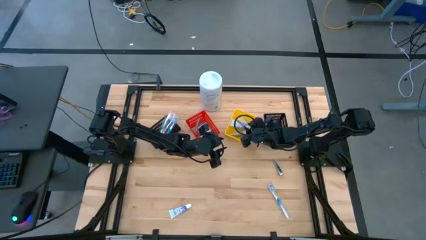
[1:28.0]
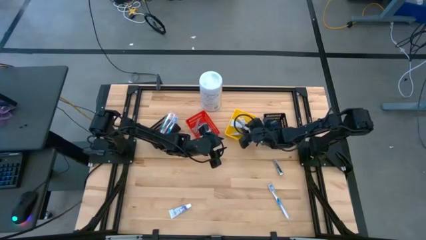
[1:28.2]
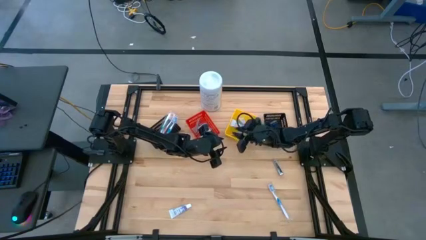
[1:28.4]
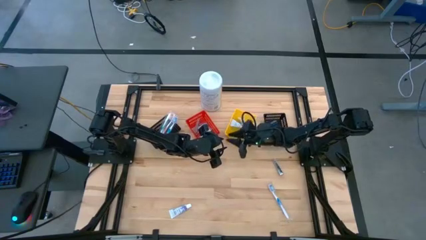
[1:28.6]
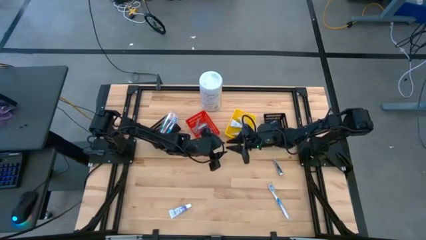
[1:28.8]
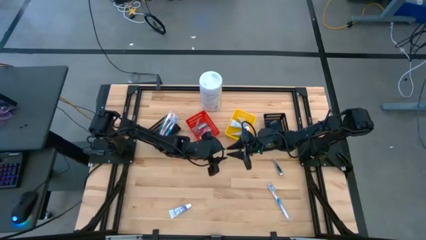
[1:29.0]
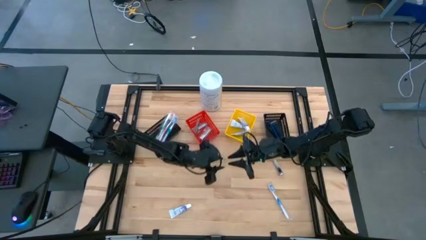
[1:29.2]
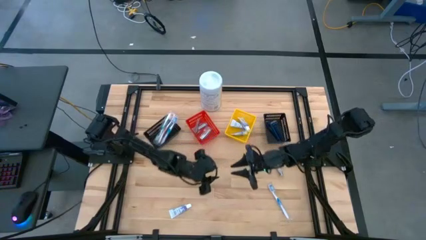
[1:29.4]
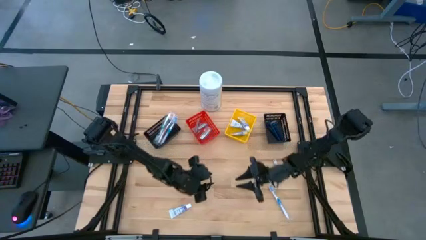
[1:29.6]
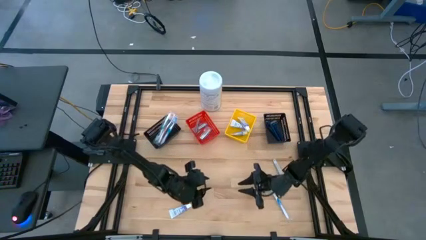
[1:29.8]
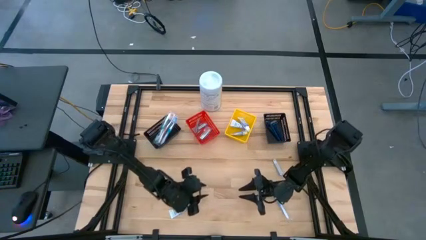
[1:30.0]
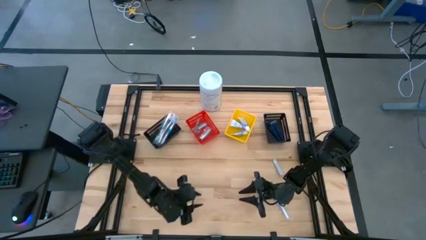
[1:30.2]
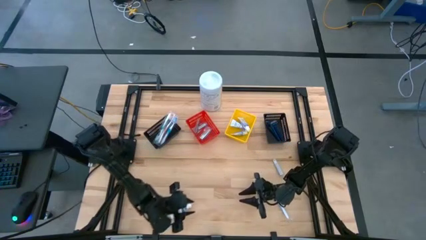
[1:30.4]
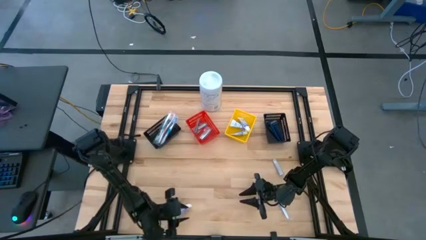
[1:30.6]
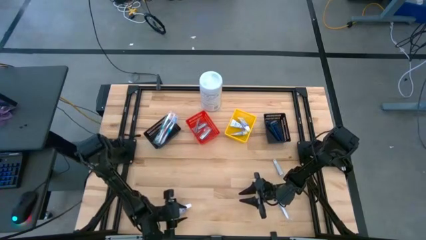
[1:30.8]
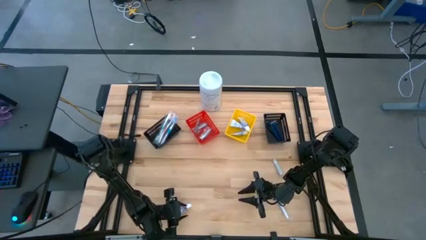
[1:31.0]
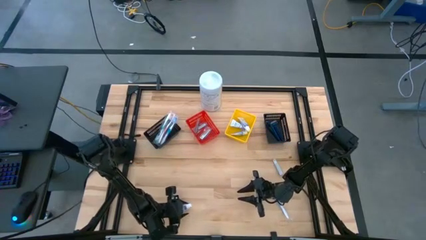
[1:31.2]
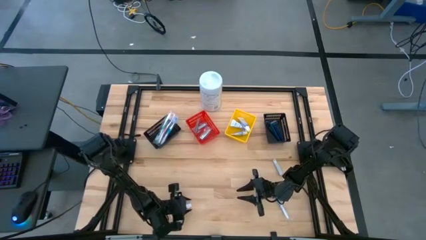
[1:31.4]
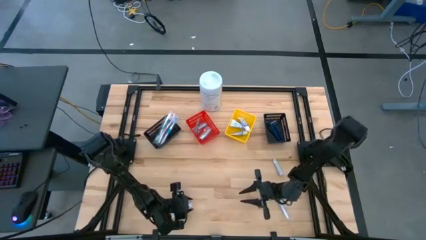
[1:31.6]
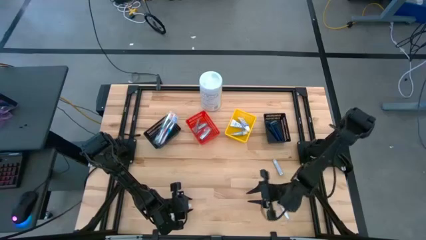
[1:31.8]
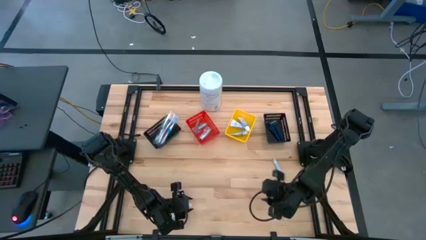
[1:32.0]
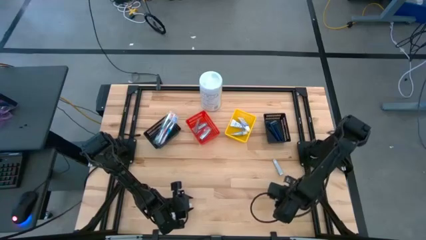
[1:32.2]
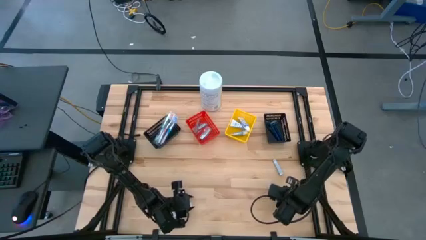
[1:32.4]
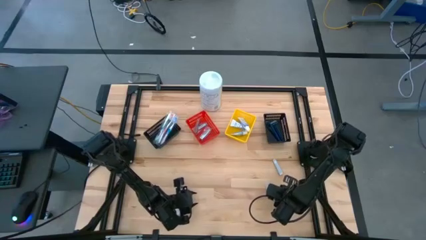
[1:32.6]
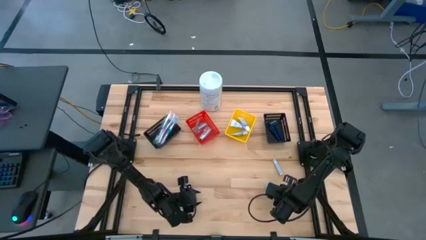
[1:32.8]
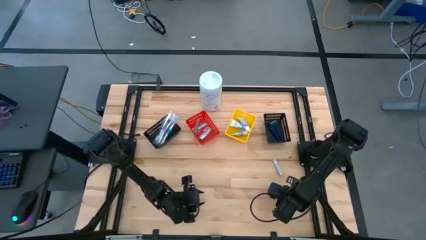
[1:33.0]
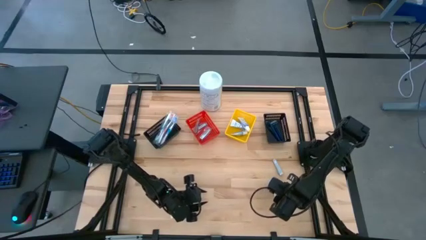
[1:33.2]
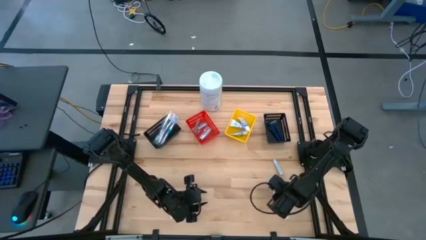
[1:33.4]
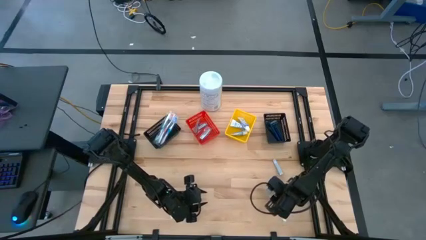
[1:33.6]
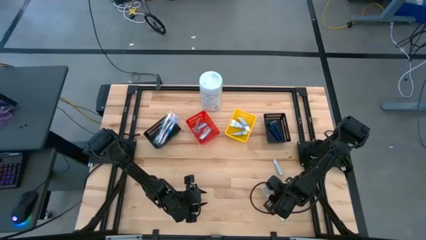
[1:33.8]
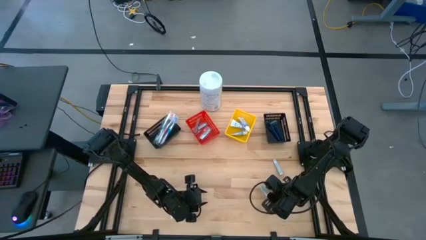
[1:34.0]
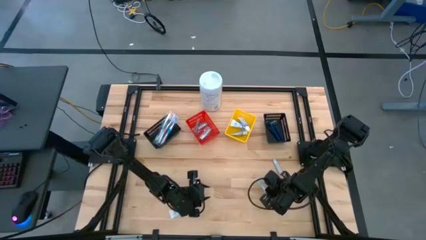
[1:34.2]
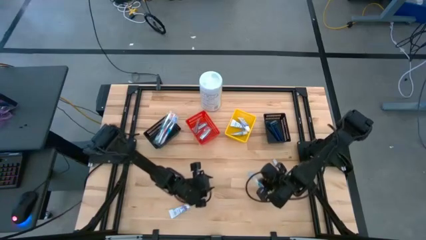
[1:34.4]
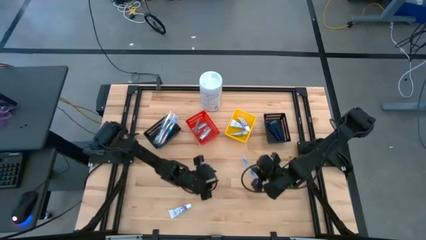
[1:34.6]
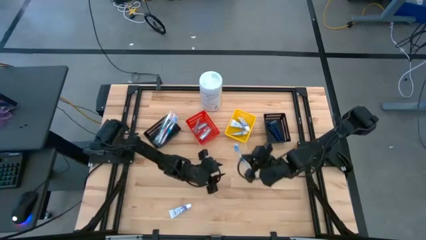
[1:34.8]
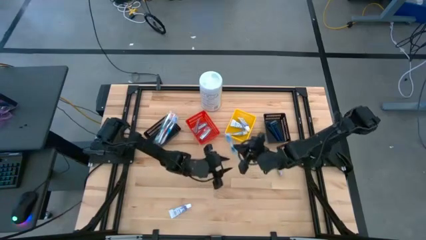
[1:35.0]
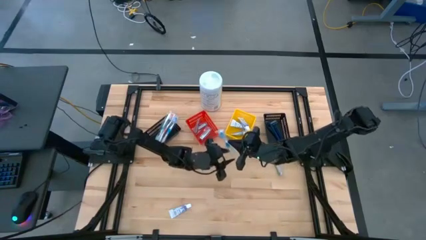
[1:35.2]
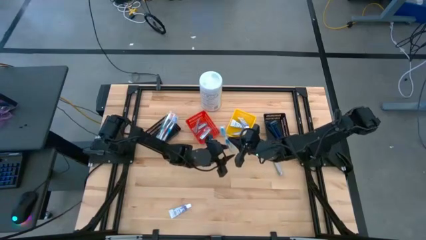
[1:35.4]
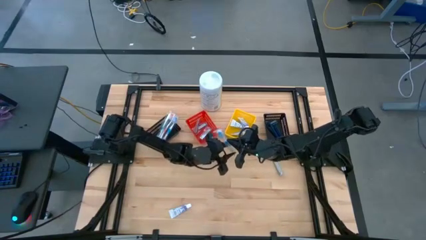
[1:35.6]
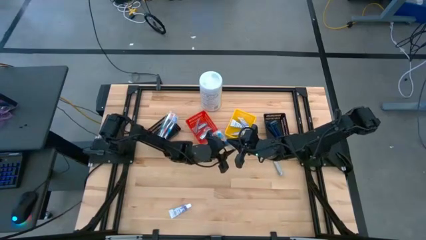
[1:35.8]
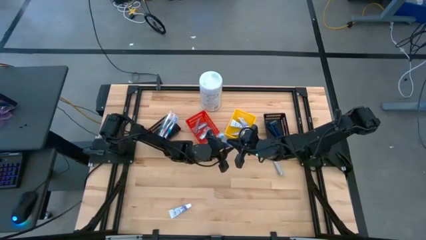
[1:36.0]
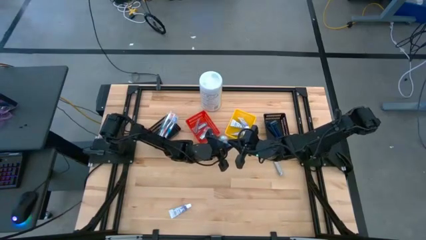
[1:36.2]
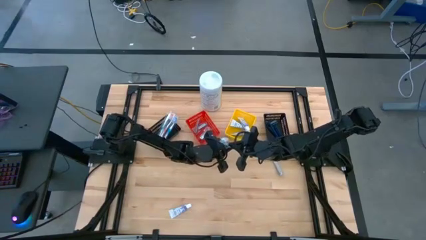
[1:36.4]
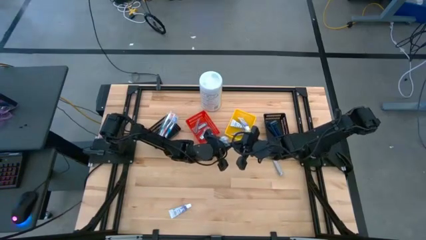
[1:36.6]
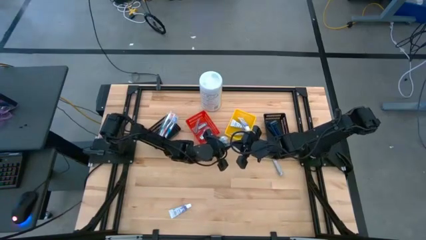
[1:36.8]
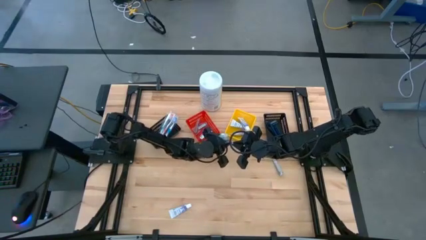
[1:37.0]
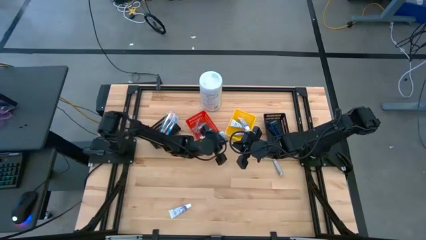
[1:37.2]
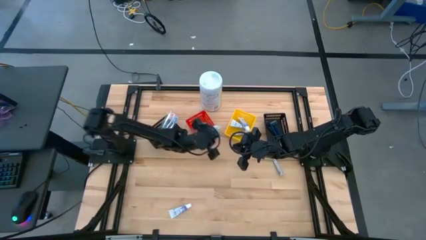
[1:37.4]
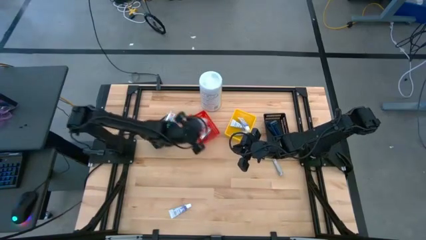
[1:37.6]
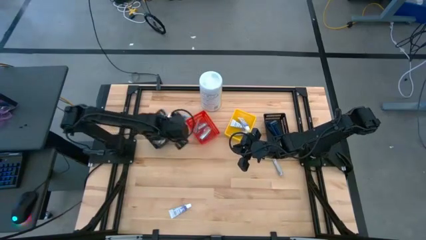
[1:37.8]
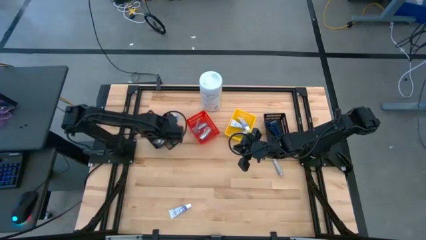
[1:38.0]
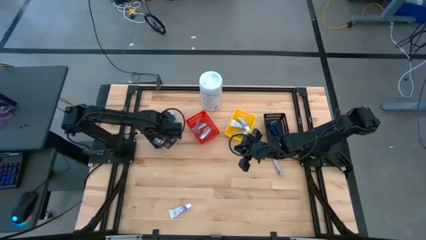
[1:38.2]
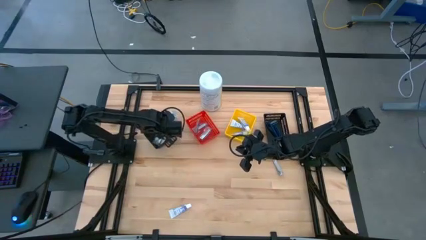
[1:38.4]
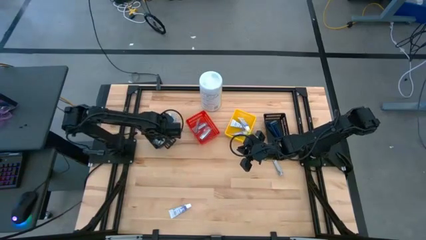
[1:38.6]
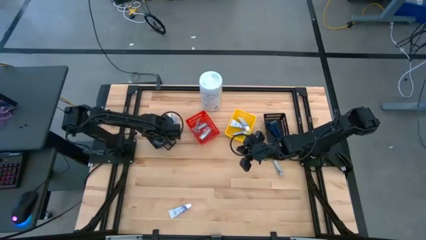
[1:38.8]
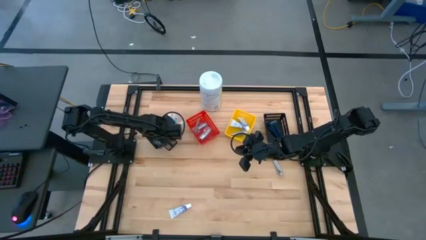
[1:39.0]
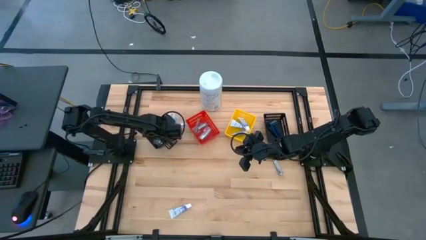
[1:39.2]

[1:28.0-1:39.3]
Task: Pick & Place Travel size toiletries
Put the blue toothbrush into the left black basket

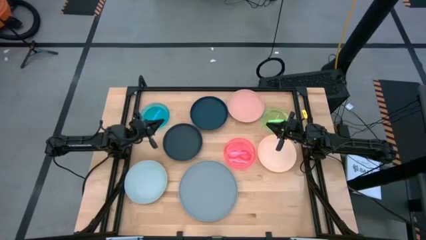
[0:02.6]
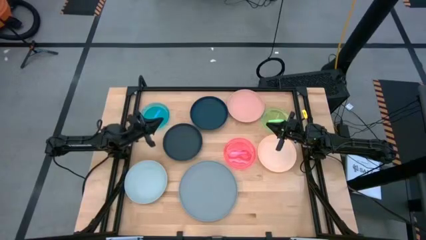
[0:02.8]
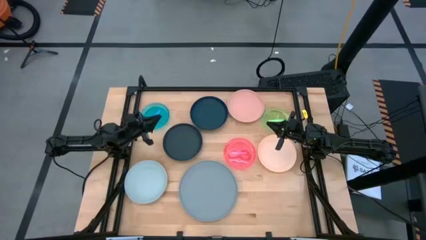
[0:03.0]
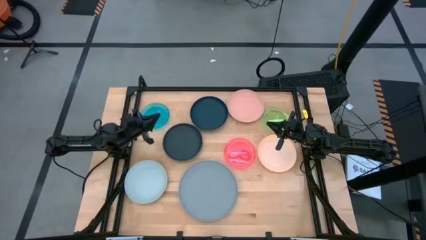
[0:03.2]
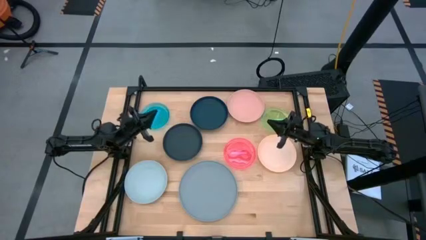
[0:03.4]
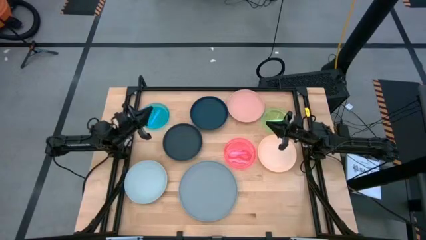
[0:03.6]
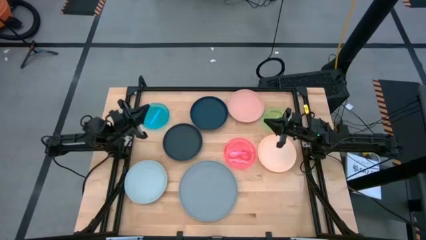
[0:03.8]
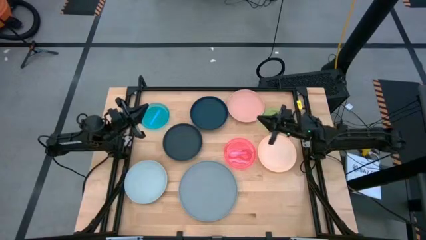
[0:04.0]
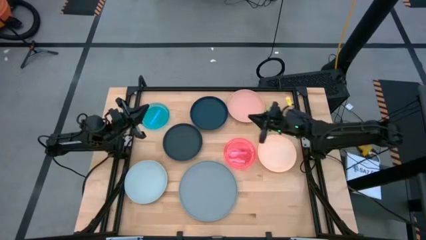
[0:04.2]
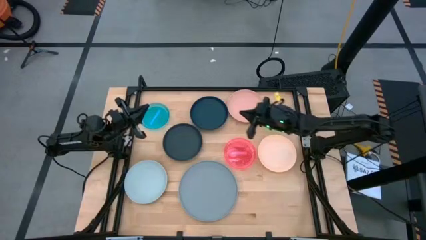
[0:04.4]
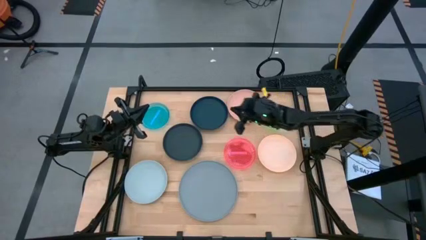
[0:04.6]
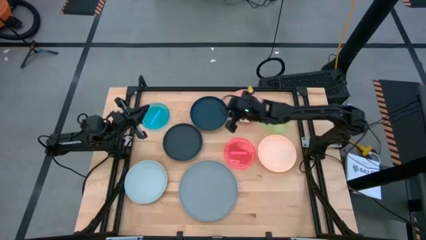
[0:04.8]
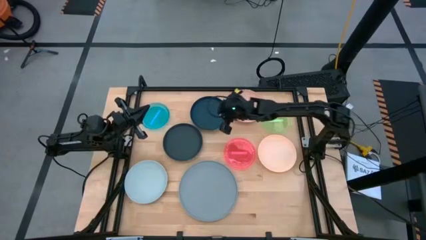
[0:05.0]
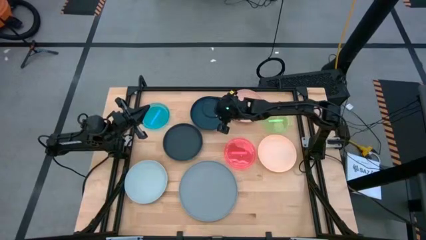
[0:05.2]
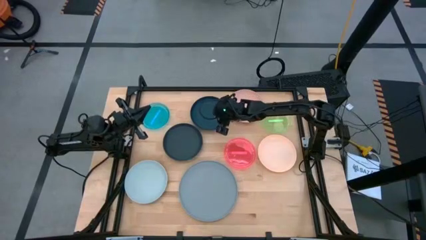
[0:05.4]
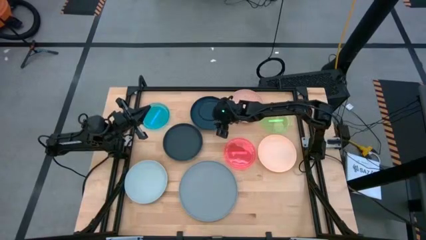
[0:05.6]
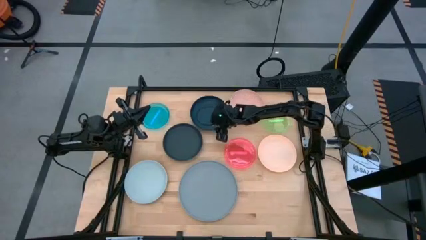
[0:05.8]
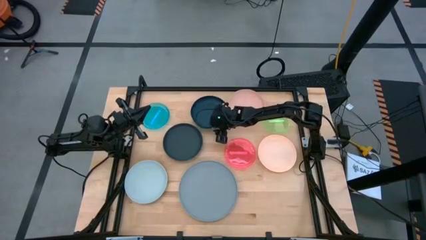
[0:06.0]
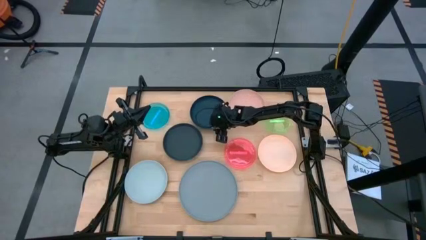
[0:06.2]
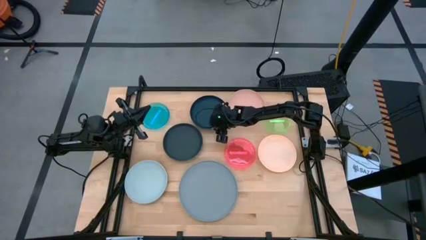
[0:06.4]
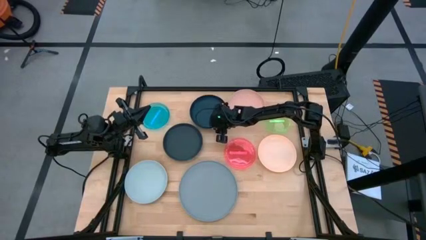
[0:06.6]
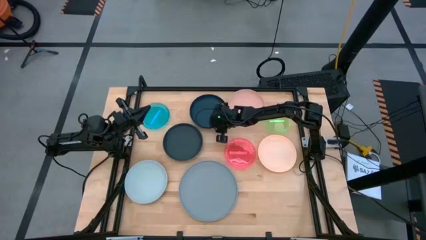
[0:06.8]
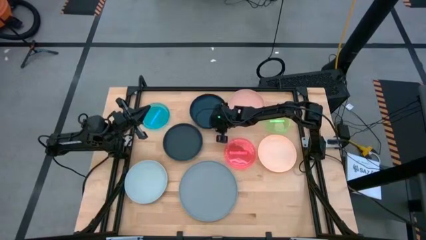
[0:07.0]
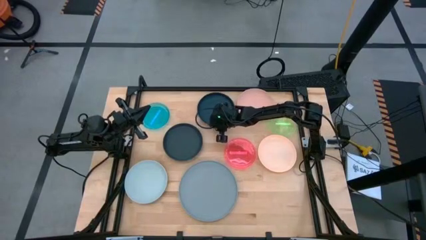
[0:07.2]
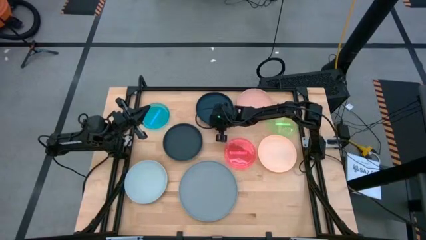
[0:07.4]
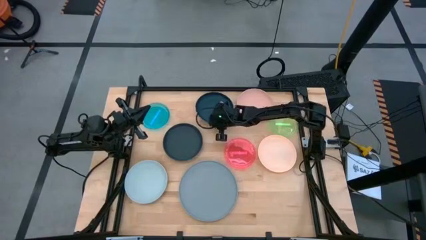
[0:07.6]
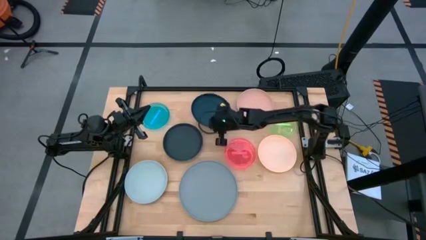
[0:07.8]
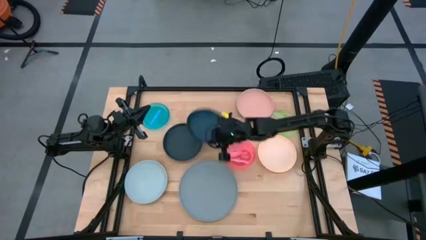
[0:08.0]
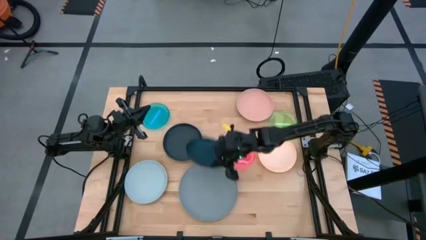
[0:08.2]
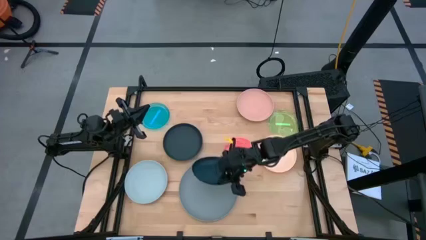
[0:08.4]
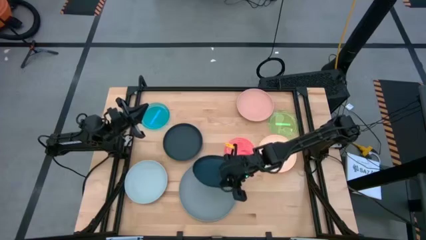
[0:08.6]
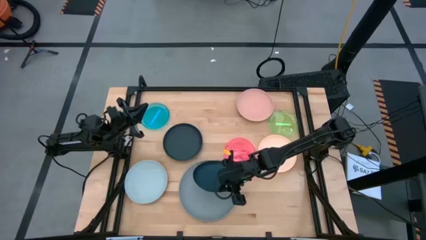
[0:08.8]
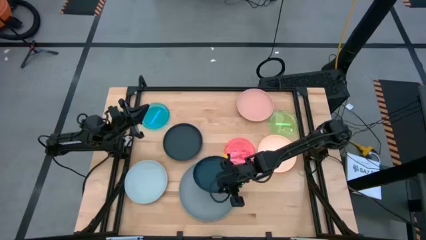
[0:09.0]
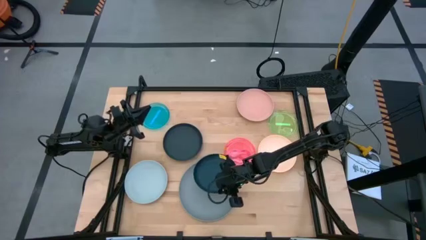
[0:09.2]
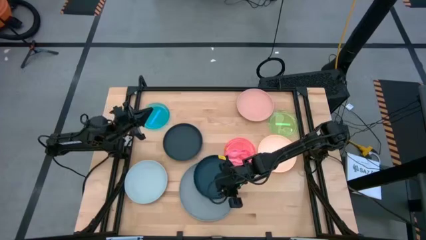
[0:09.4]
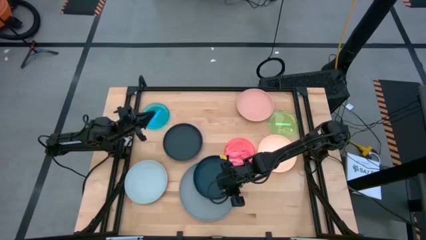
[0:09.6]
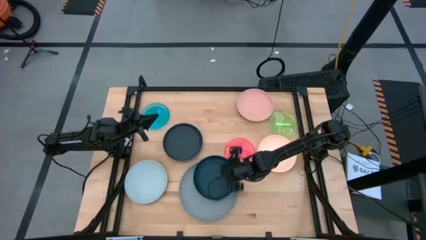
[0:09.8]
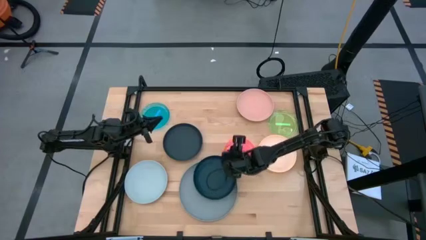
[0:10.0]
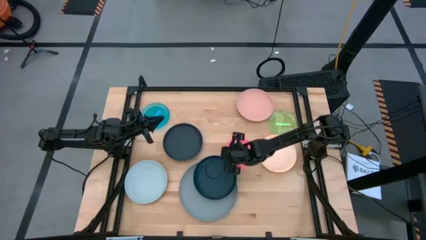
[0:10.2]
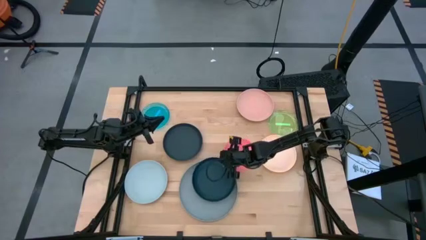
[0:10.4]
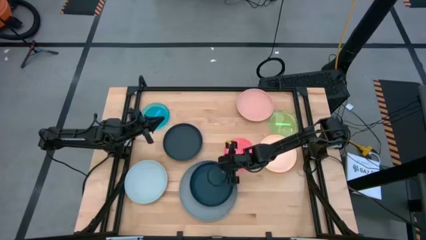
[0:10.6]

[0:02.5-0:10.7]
Task: Stack plastic plates
Stack the top dark blue plate on top of the gray plate
